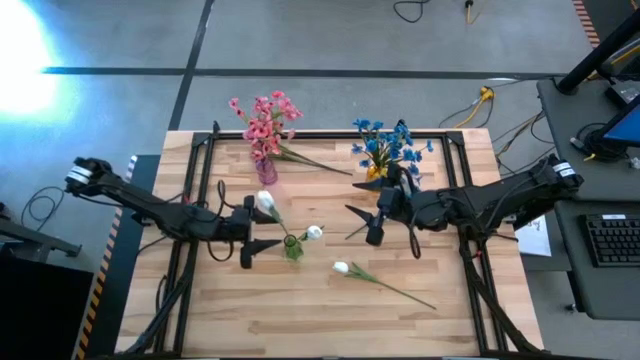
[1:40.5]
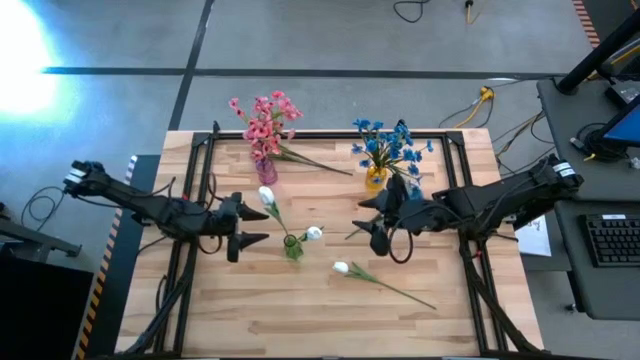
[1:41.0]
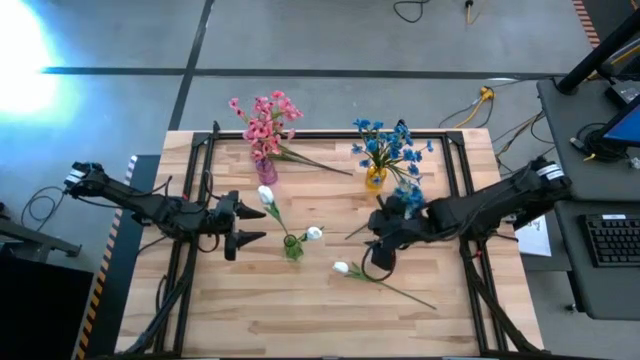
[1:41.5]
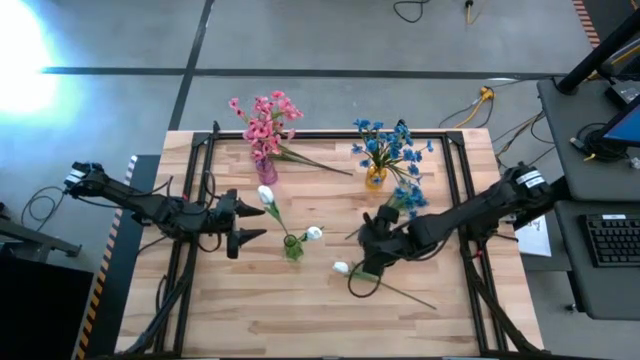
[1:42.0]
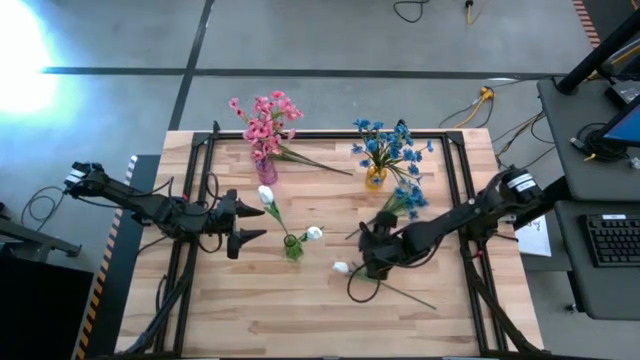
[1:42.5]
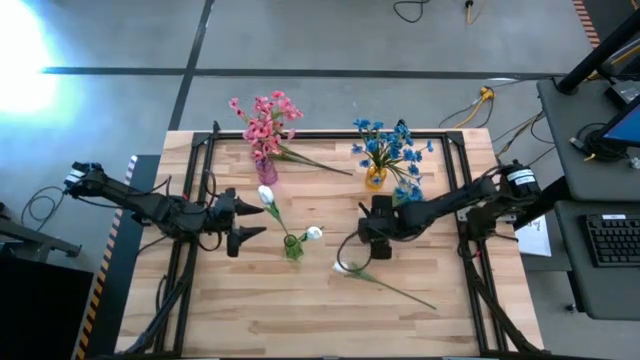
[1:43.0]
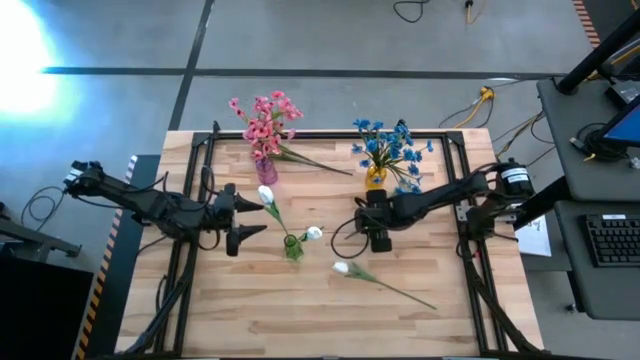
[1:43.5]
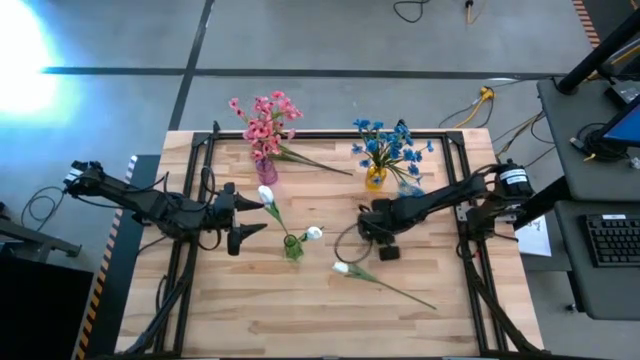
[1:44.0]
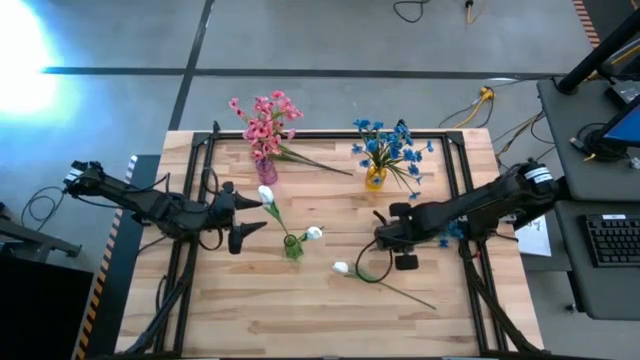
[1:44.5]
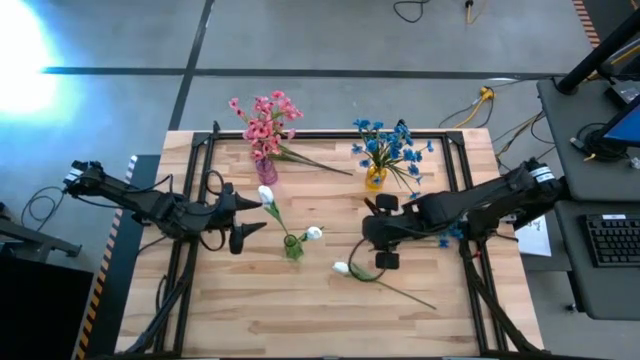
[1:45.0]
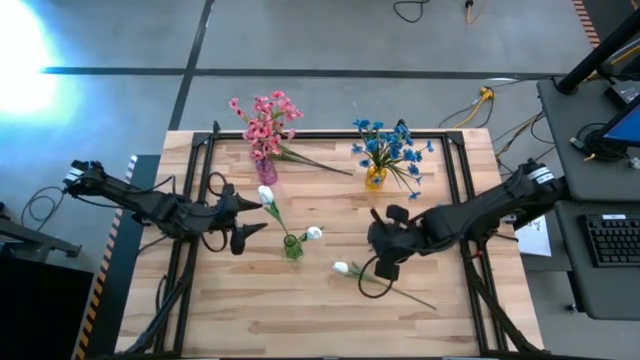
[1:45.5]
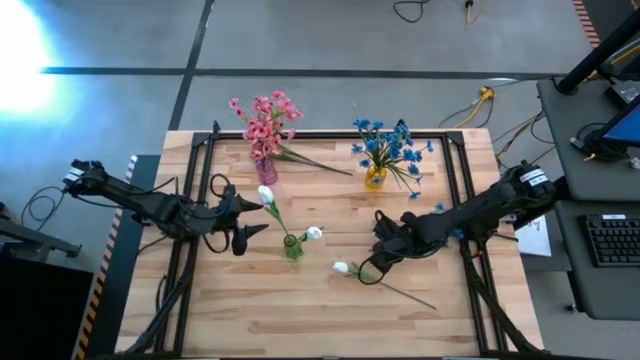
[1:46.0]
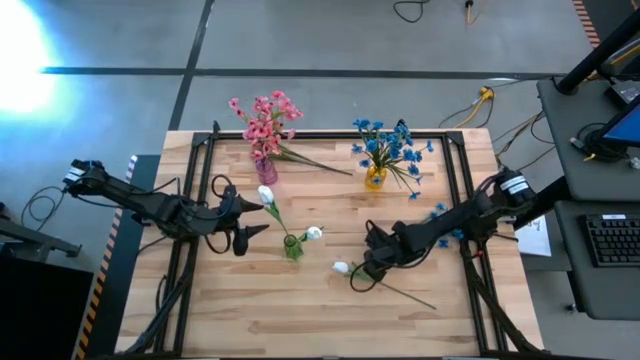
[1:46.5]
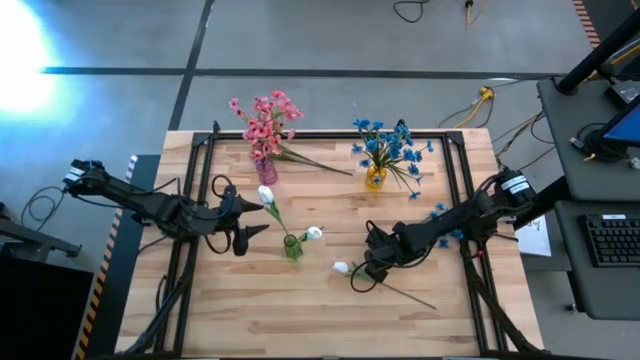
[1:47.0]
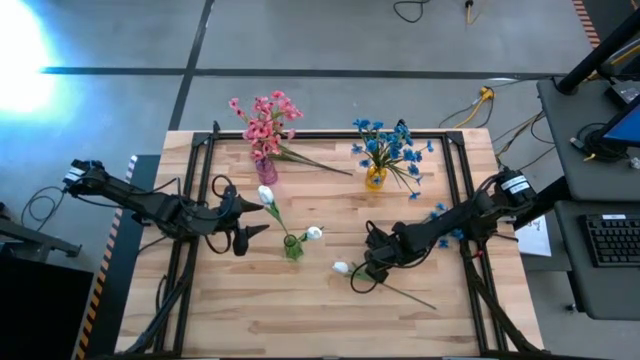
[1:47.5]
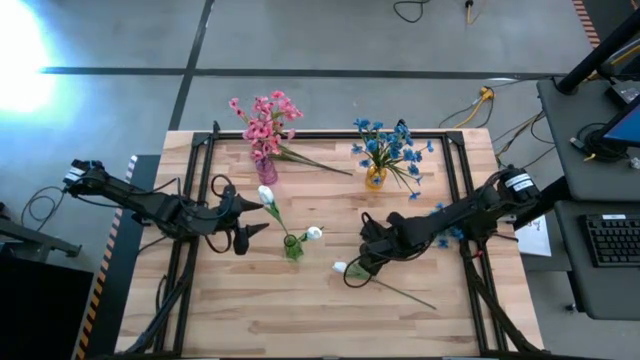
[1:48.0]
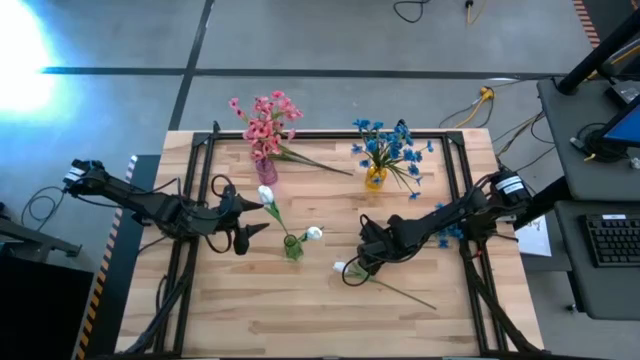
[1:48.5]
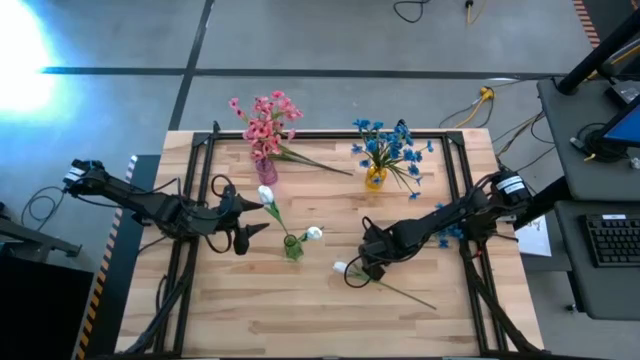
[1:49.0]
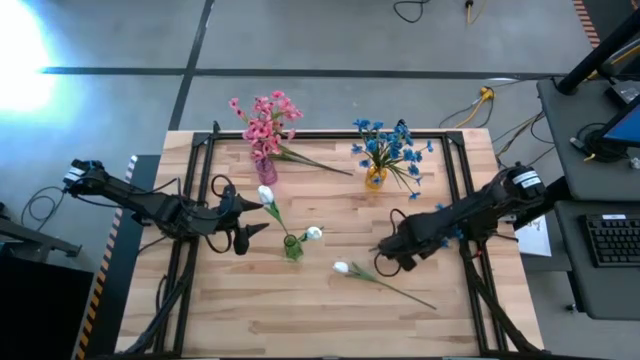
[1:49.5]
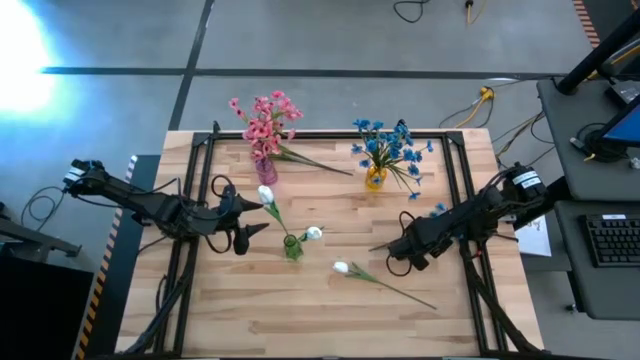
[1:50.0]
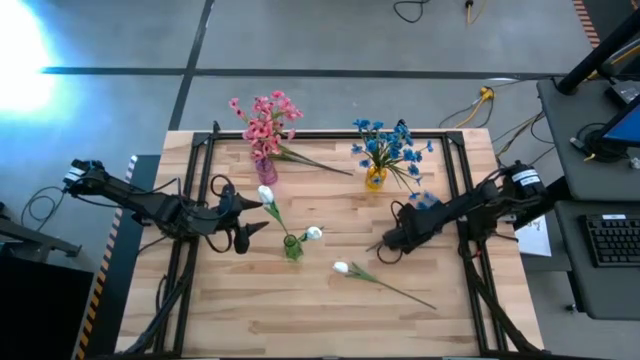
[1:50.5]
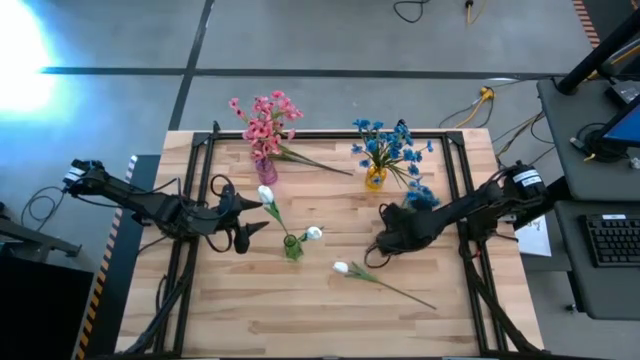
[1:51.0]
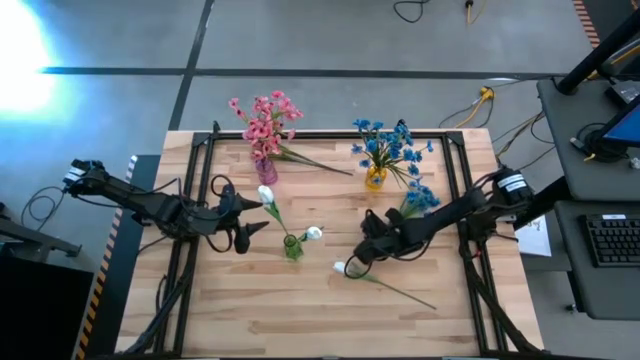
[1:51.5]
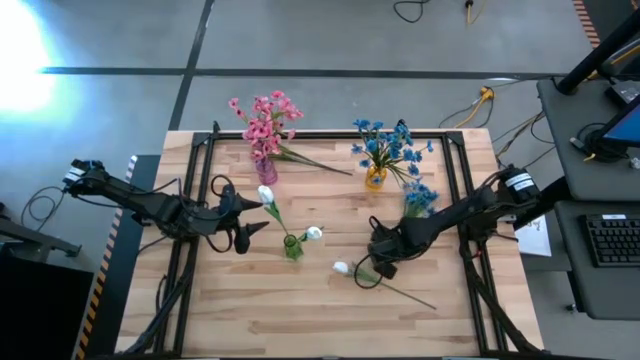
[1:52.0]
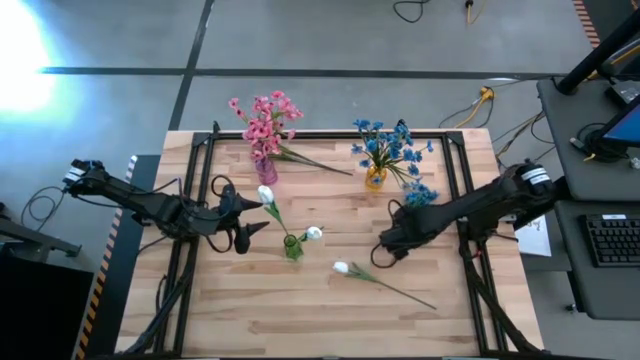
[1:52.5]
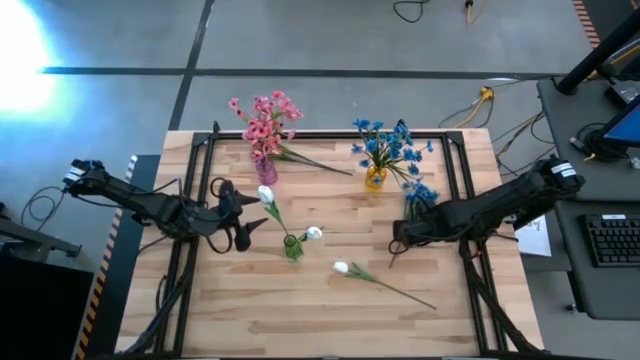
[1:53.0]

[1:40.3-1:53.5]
Task: Sort flowers into vase by color
Put the blue flowers into the yellow vase

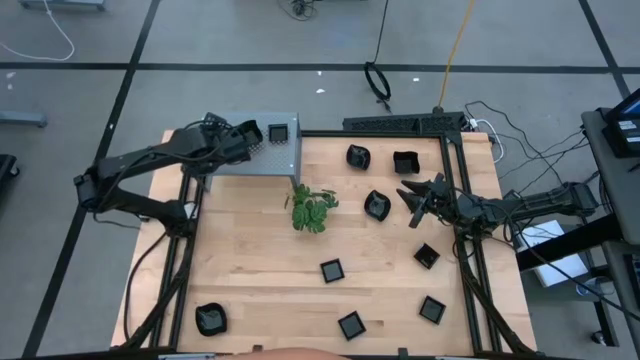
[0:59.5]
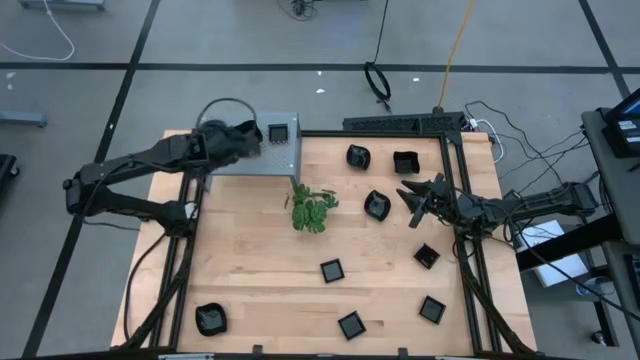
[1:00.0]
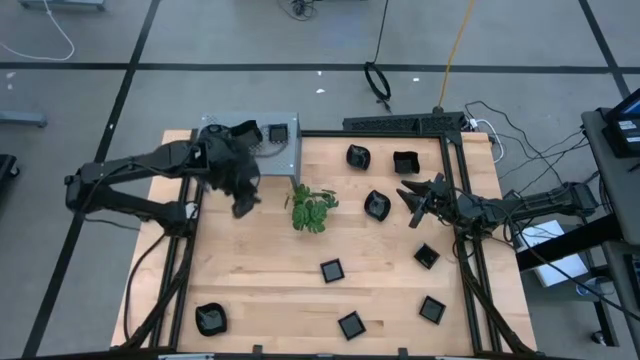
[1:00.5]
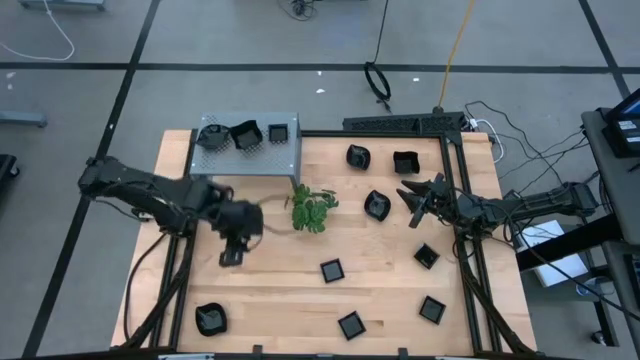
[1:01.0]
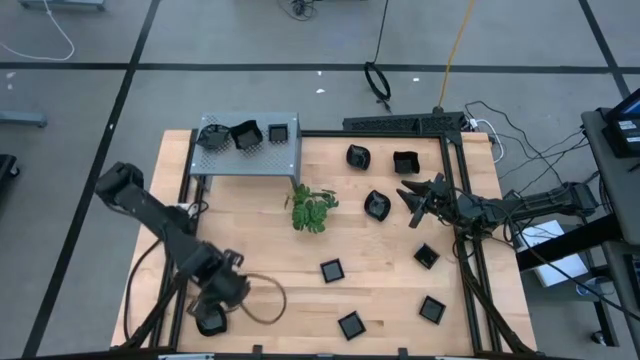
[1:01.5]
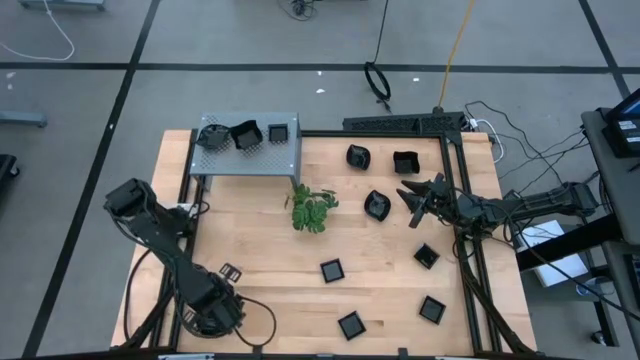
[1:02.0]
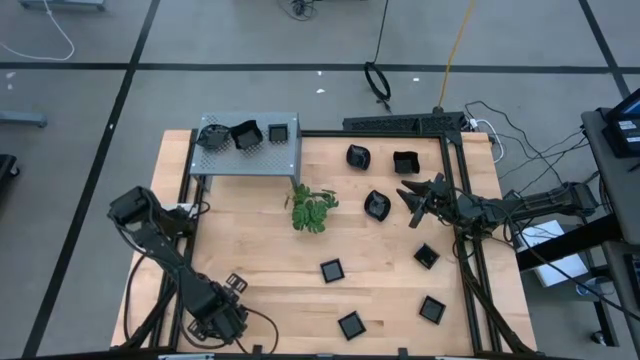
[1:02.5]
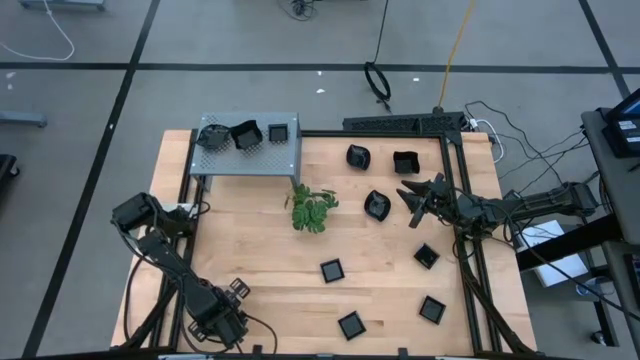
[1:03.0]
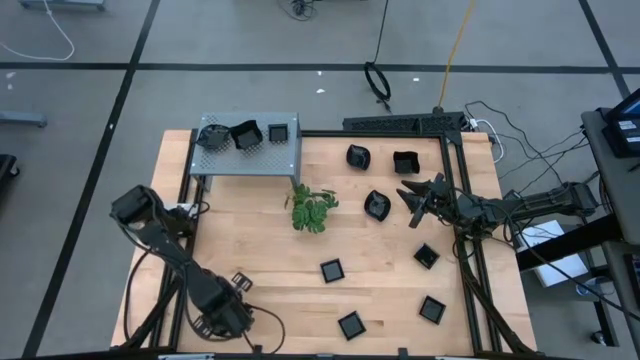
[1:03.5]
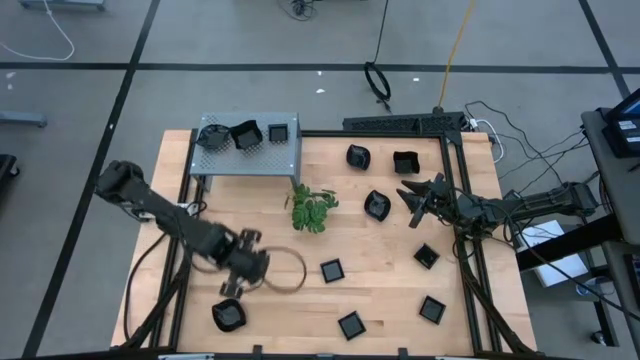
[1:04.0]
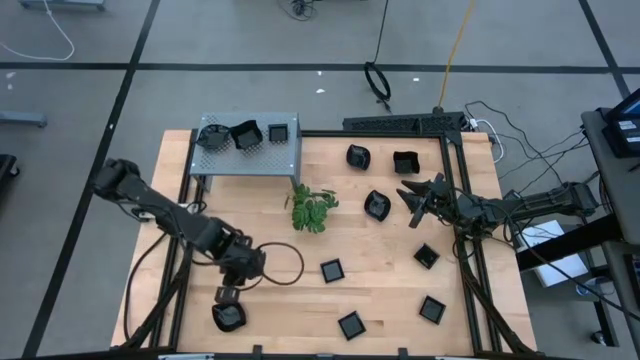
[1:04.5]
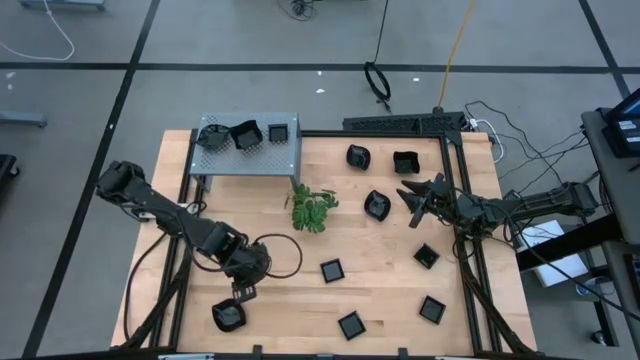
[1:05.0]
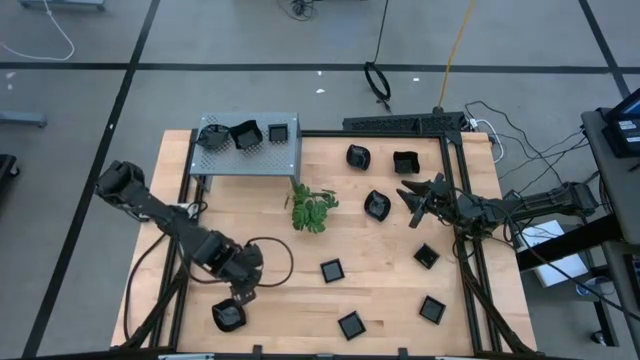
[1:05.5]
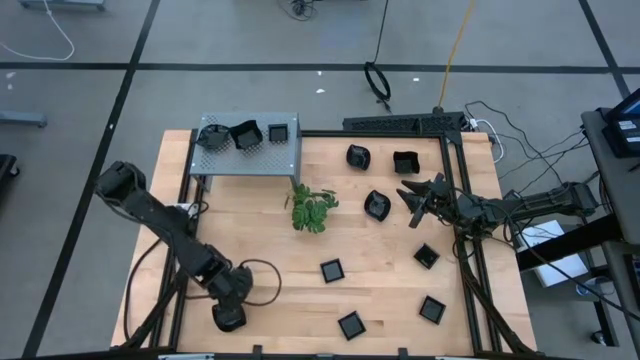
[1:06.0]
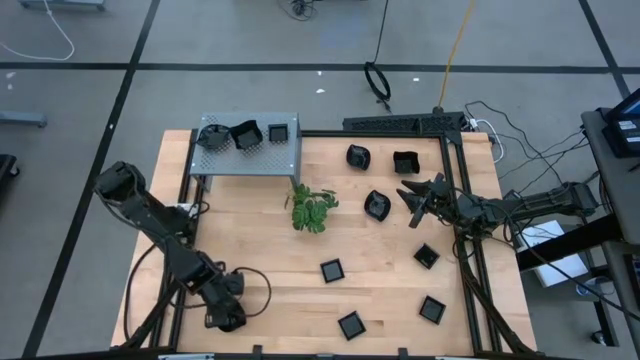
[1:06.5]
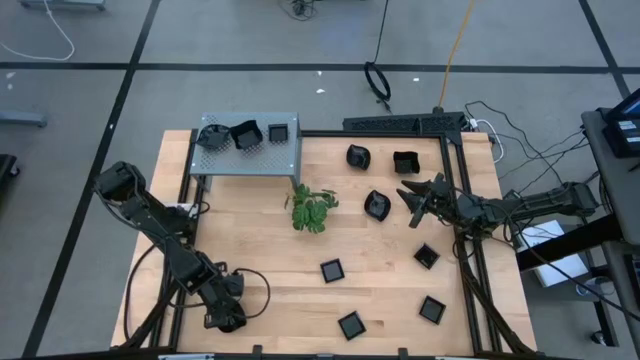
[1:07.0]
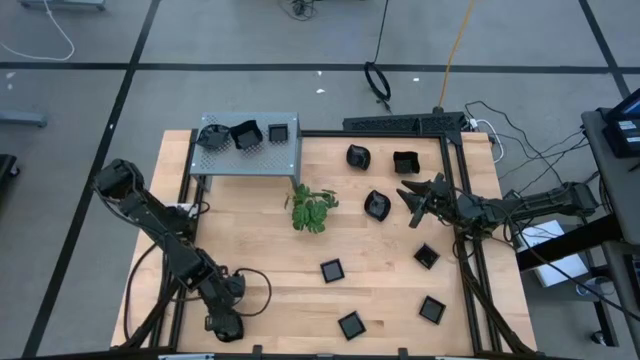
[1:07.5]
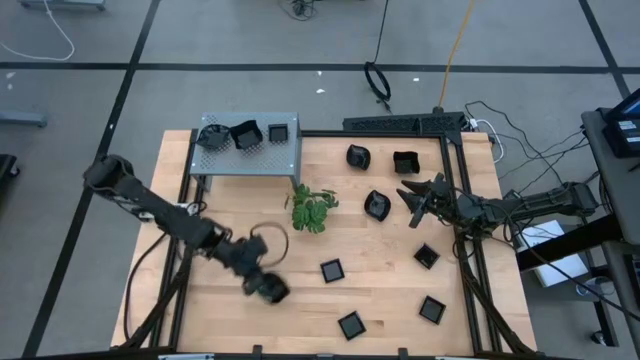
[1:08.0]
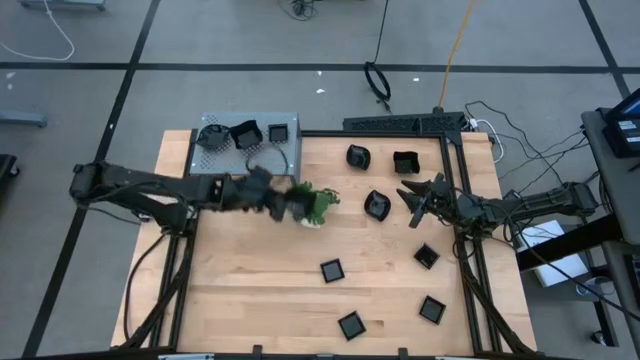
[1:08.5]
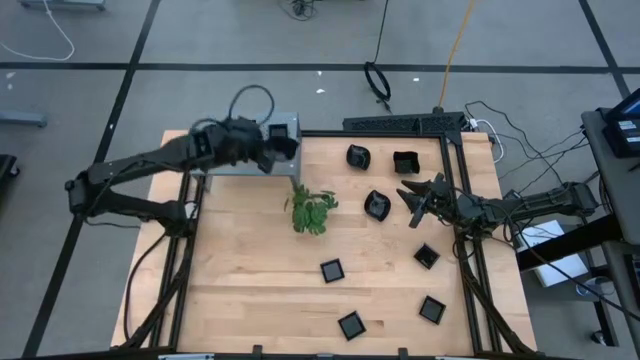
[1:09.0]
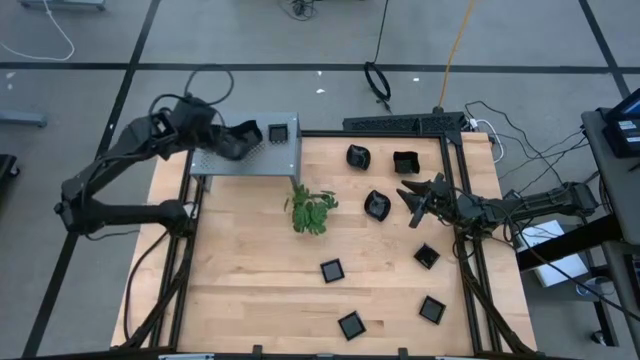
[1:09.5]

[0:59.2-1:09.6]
Task: Pick & Place Mini shaped plates
Stack the leaf shaped plate on top of the leaf shaped plate on the shelf
